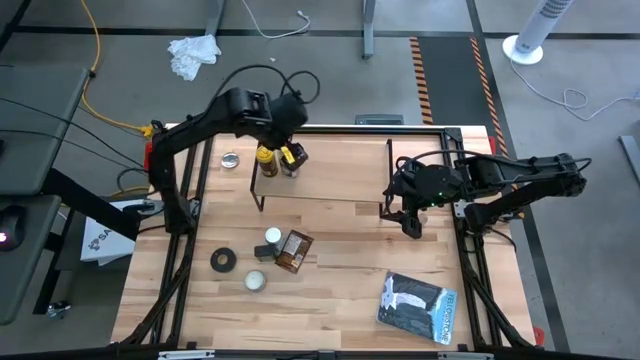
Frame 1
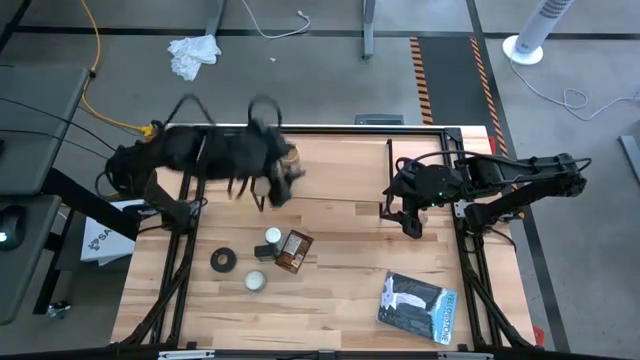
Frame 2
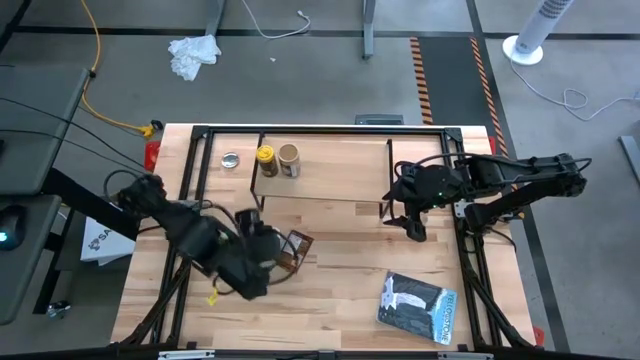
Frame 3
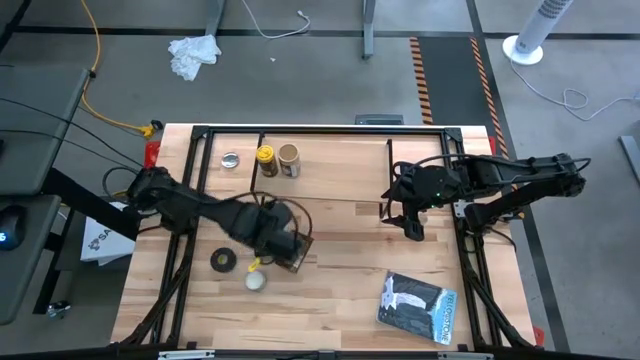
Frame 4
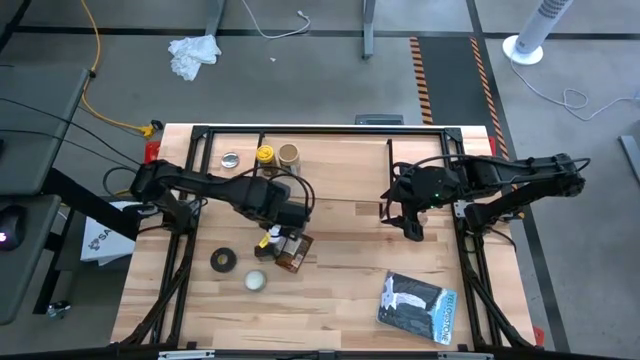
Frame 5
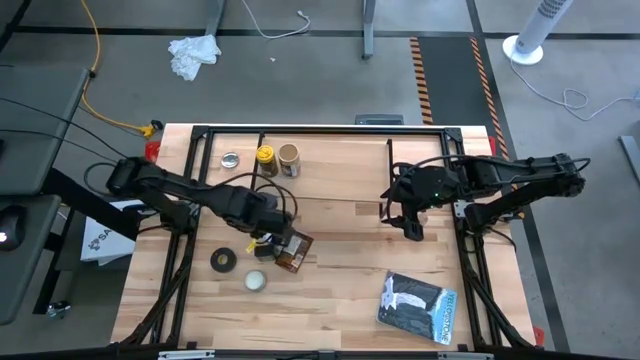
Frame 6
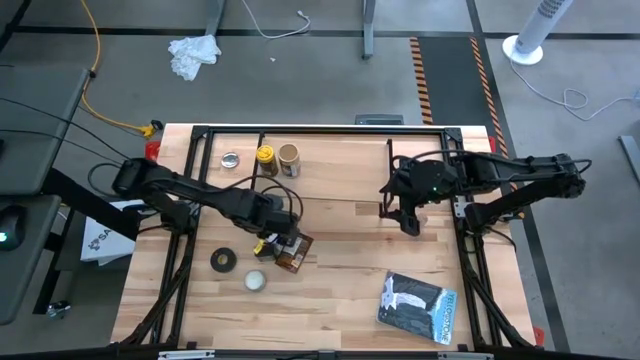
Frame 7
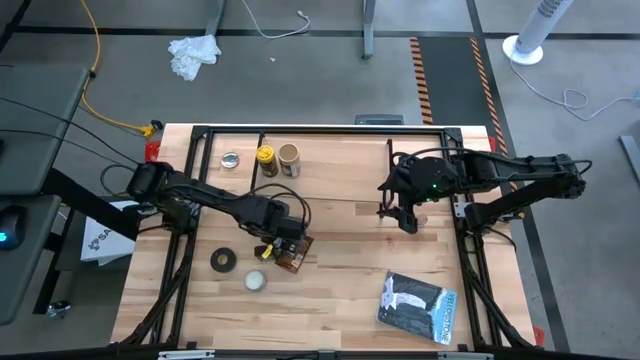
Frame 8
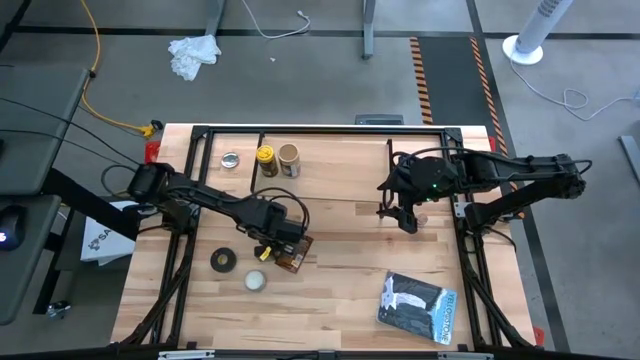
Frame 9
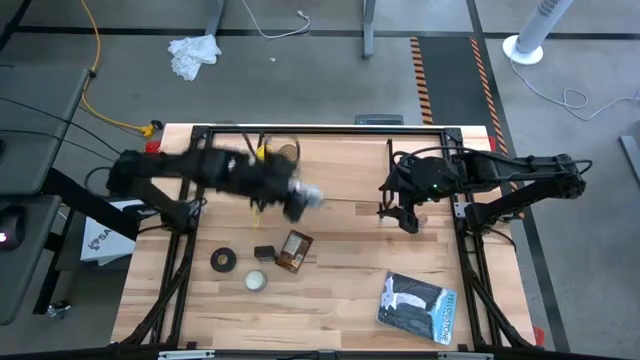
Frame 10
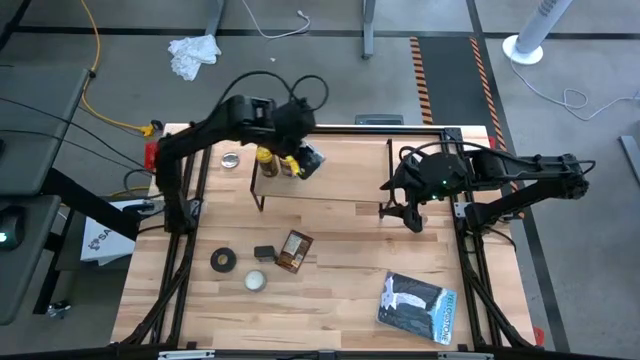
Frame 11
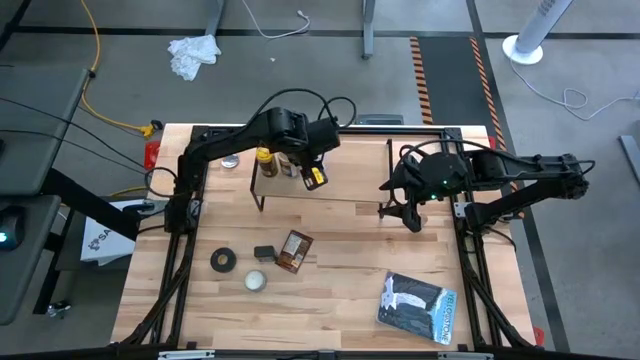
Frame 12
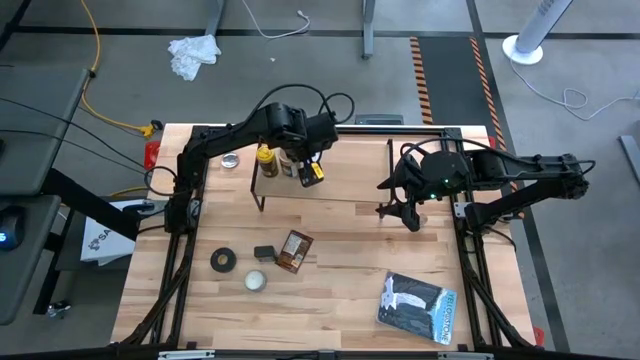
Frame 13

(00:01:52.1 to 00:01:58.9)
Task: Shelf spices
Put the white seasoning bottle on the shelf

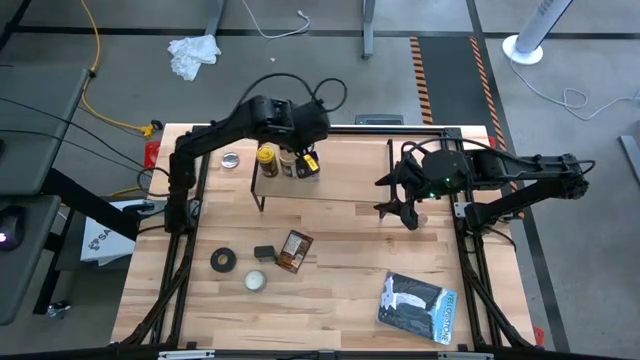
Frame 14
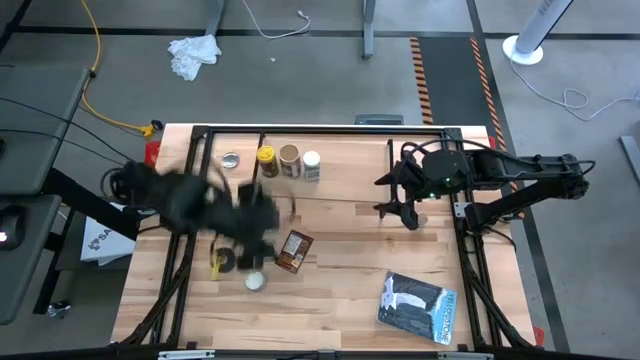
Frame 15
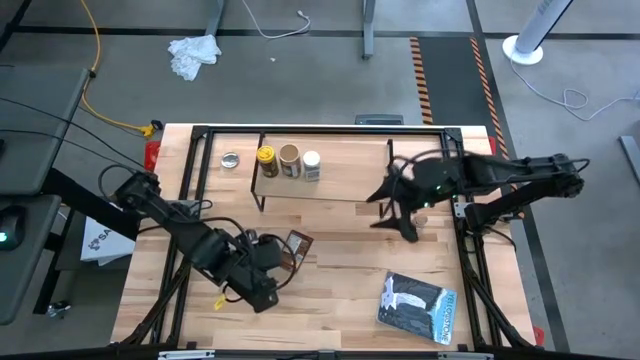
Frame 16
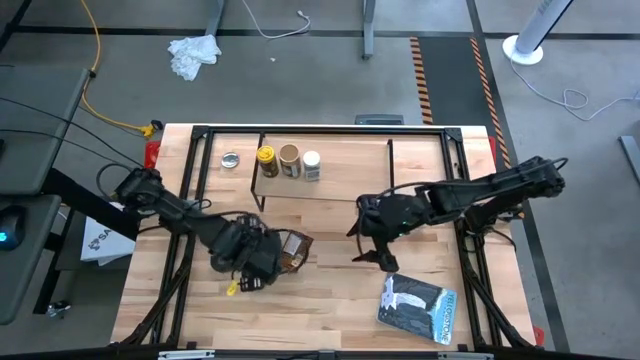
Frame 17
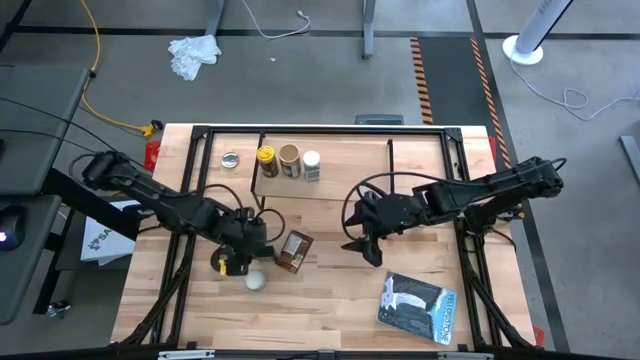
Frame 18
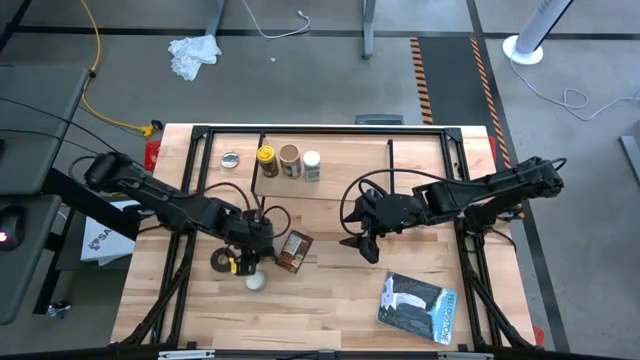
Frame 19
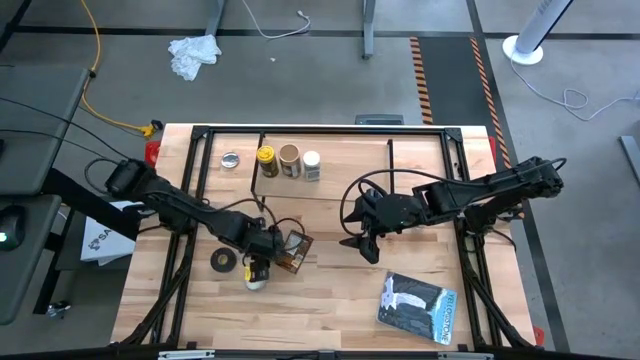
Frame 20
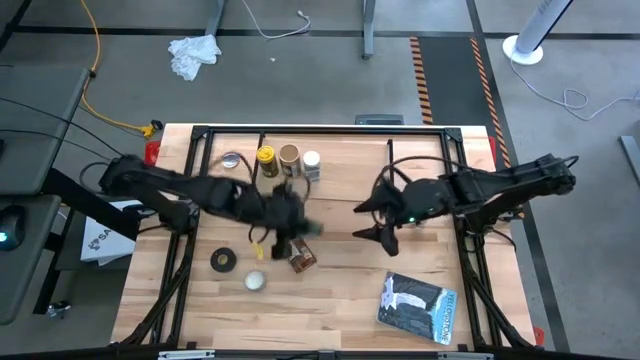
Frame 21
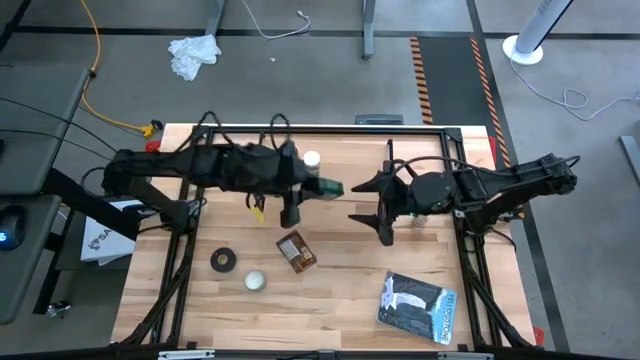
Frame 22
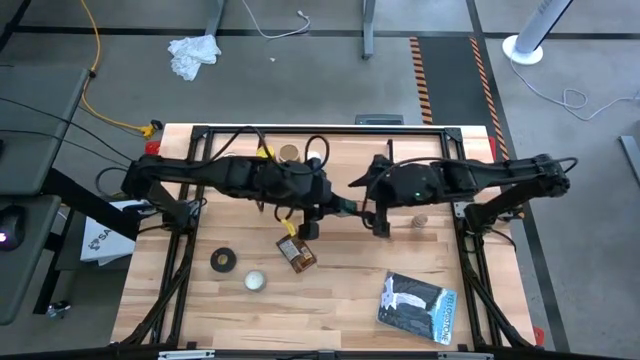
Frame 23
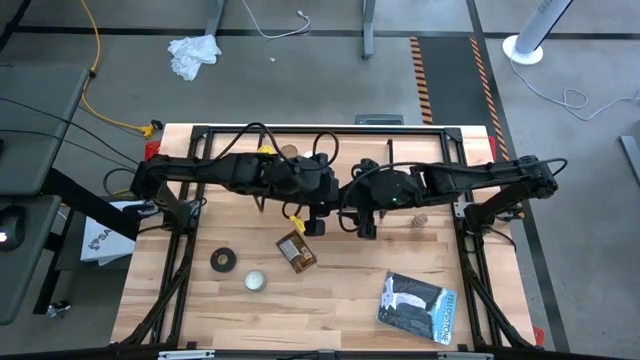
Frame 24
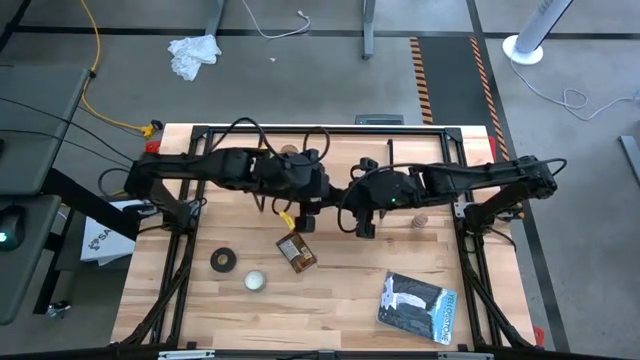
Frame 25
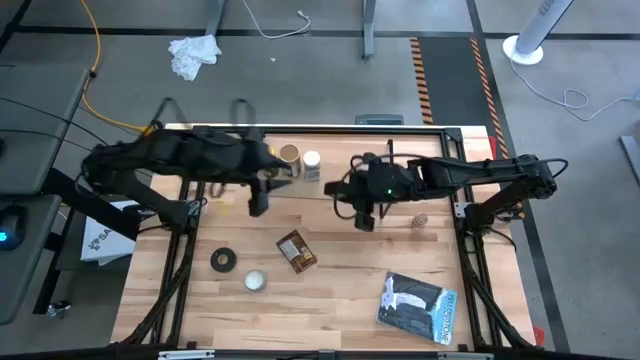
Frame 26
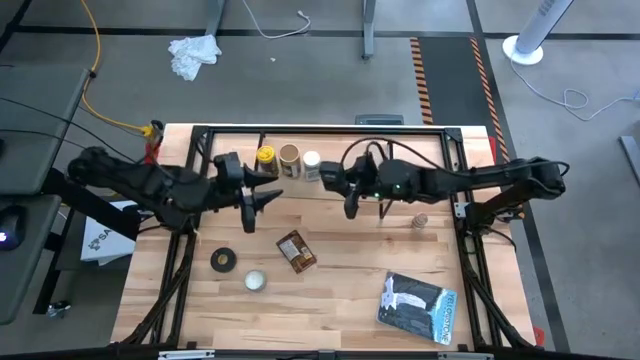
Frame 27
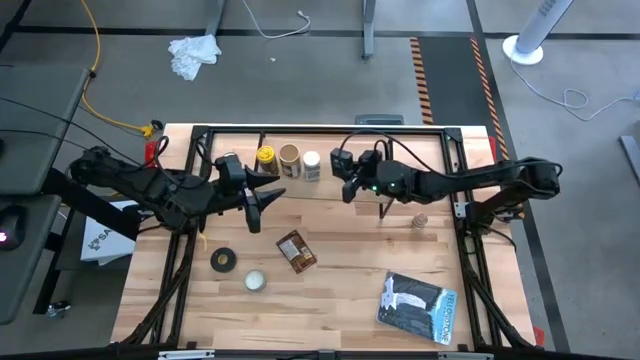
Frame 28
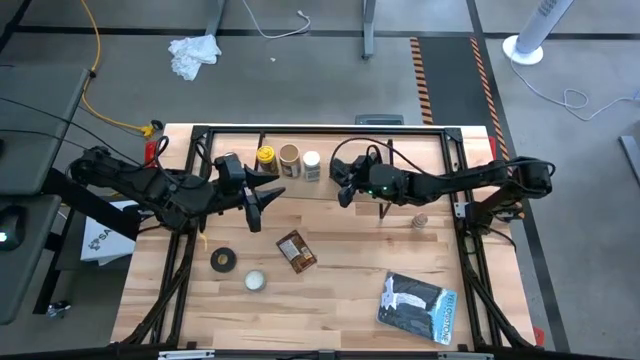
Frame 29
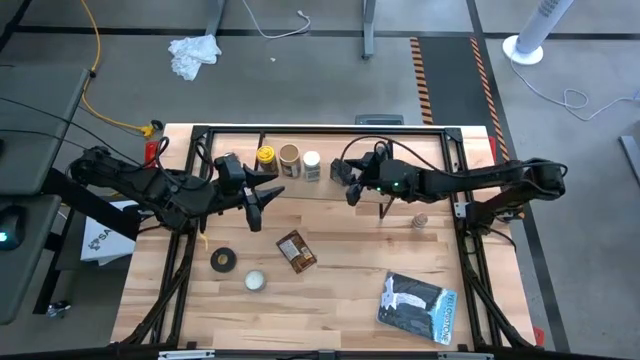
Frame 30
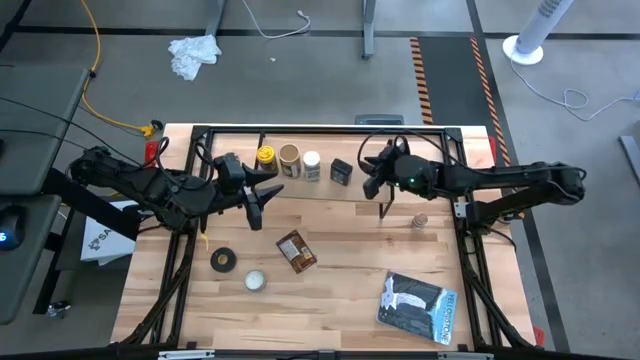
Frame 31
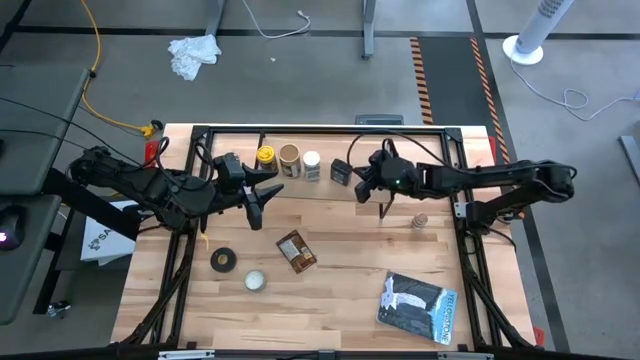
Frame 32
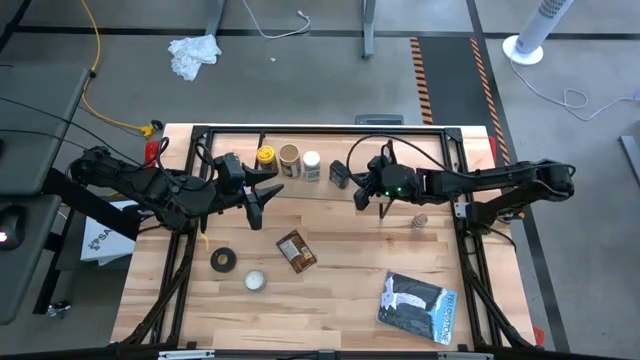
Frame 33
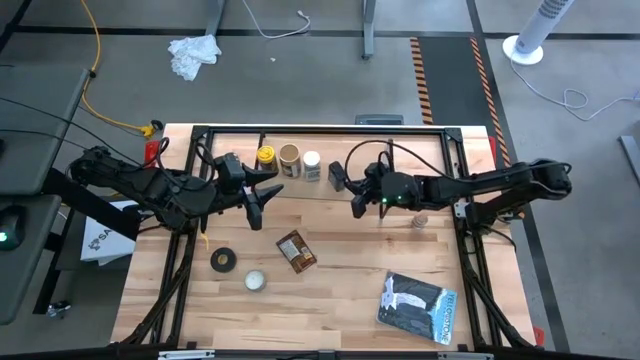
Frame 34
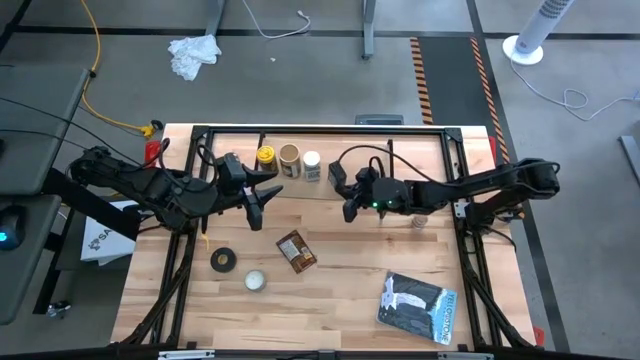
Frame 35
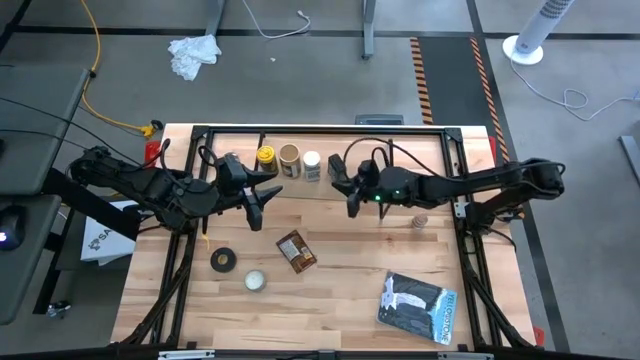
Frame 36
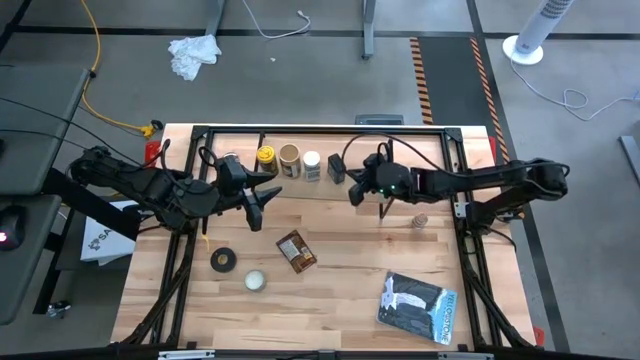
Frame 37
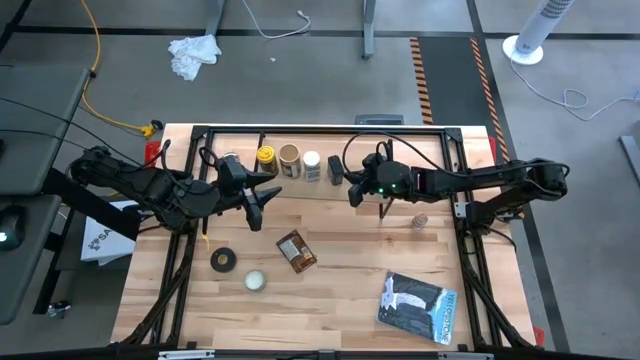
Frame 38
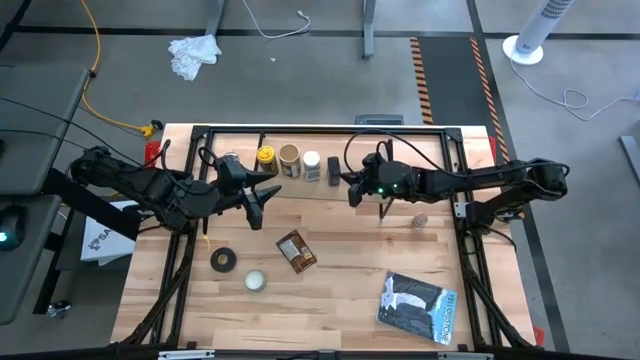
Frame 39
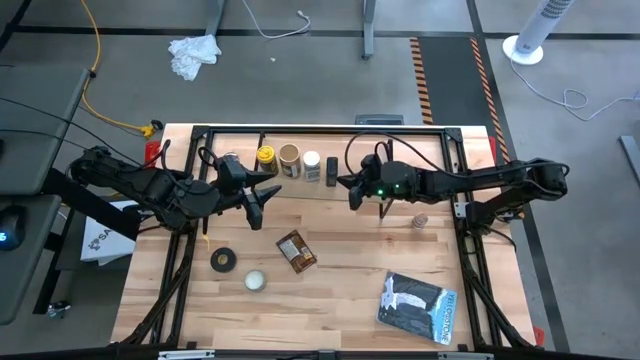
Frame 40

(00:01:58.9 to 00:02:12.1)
Put the black seasoning can on the shelf

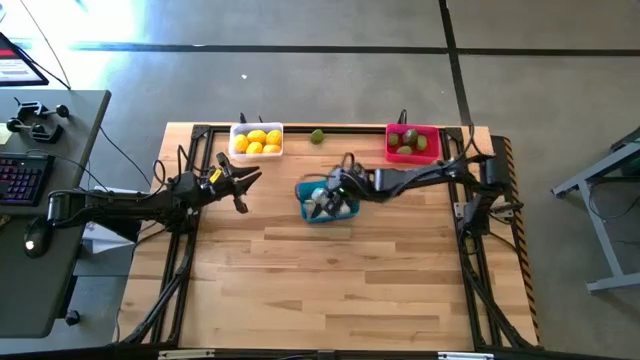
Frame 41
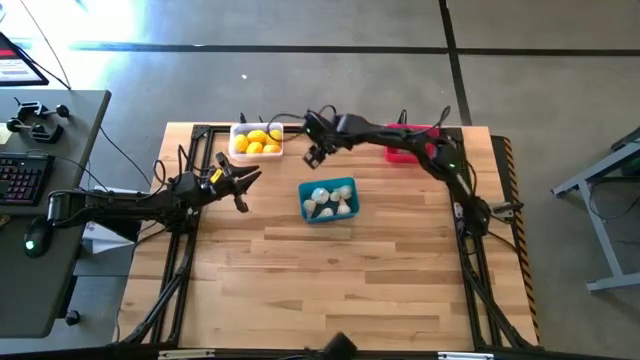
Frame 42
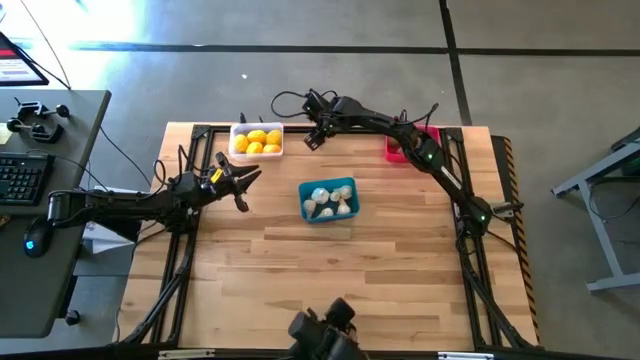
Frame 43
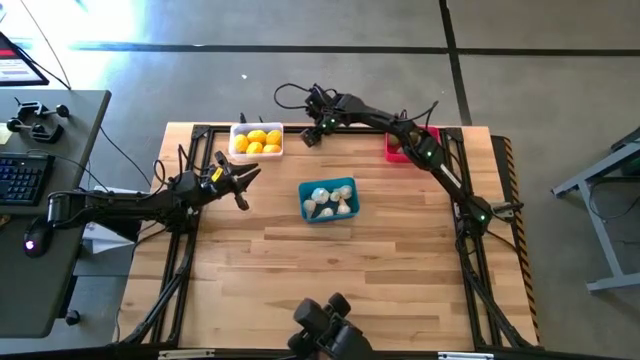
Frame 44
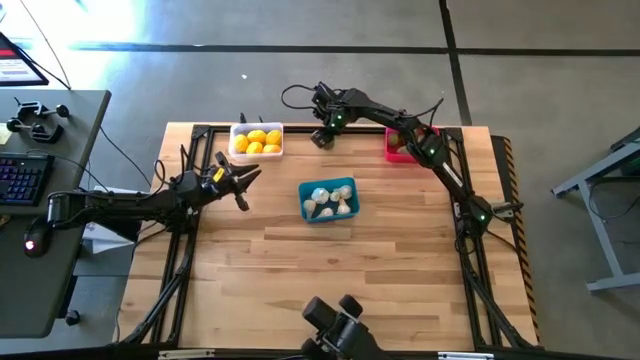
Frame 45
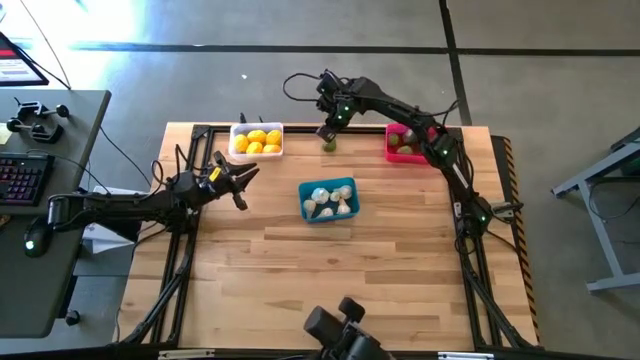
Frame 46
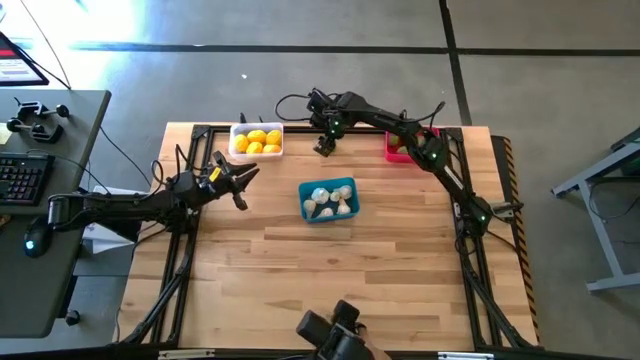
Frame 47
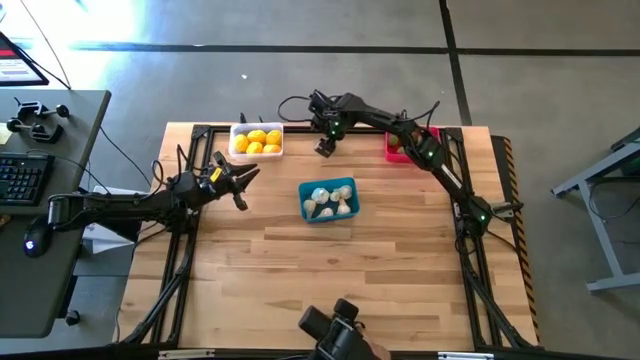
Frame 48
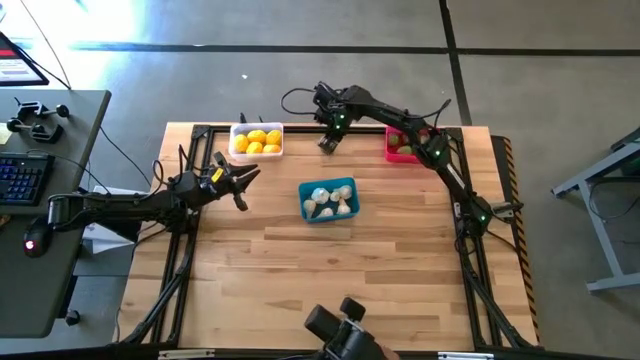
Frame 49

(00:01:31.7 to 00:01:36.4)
Task: Sort produce into baskets
Put the green lime into the pink bin
